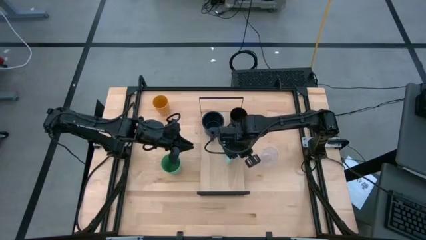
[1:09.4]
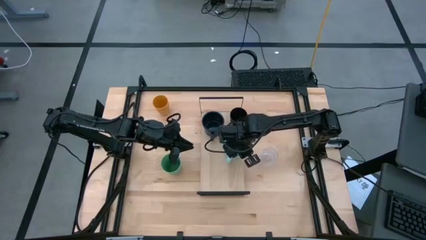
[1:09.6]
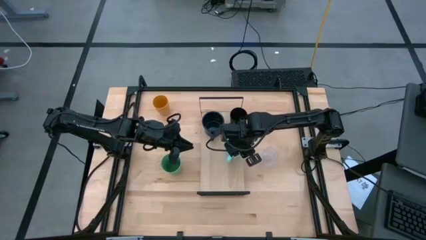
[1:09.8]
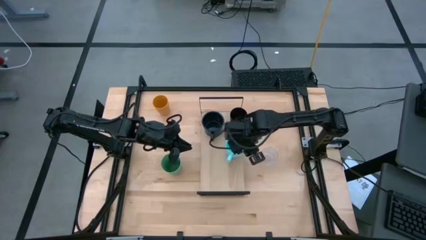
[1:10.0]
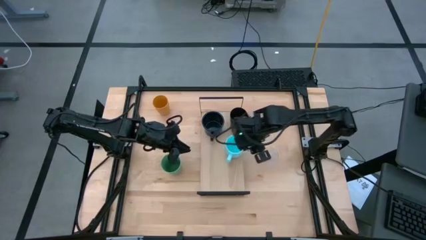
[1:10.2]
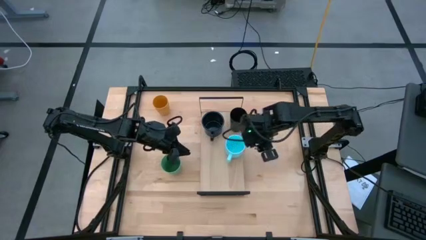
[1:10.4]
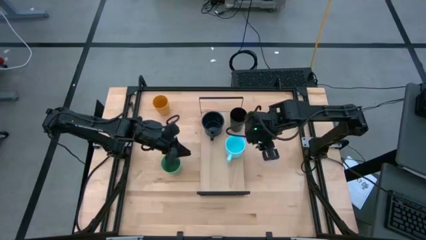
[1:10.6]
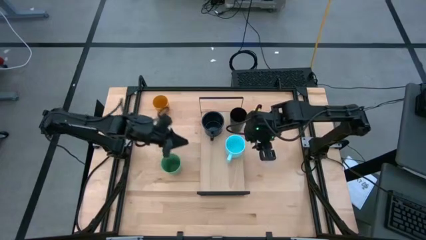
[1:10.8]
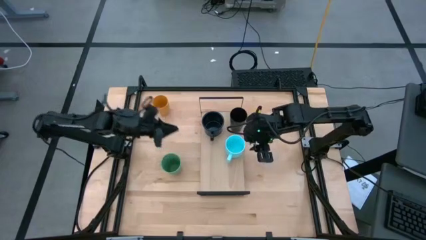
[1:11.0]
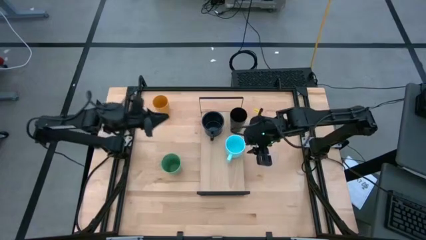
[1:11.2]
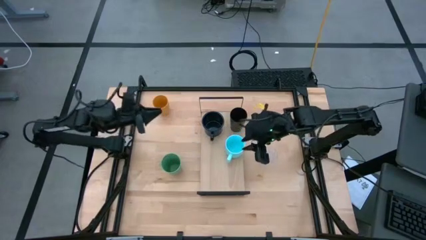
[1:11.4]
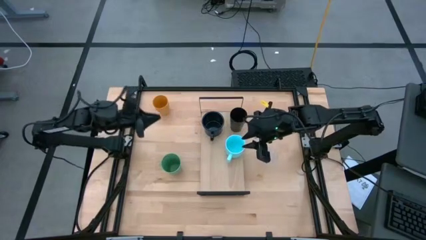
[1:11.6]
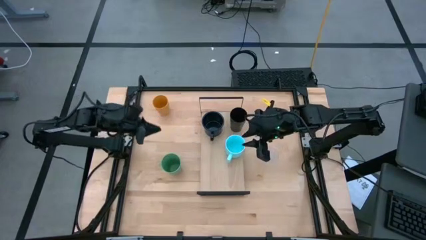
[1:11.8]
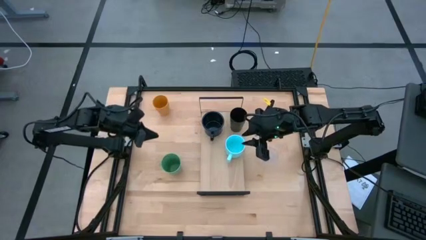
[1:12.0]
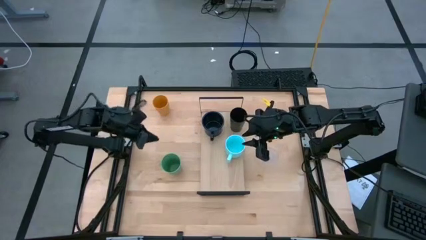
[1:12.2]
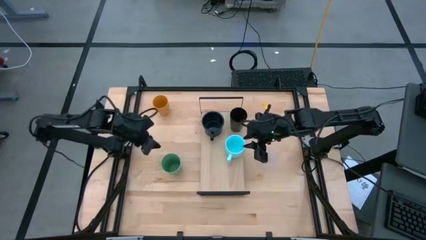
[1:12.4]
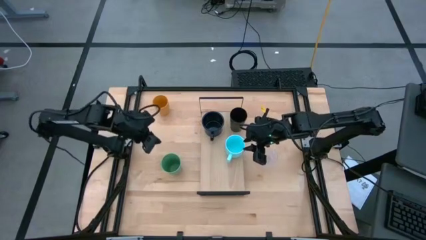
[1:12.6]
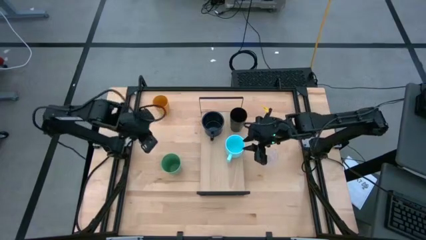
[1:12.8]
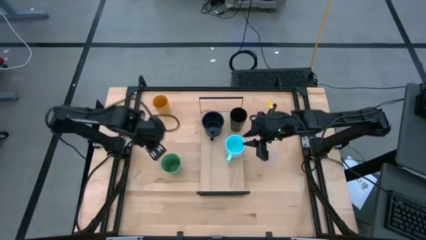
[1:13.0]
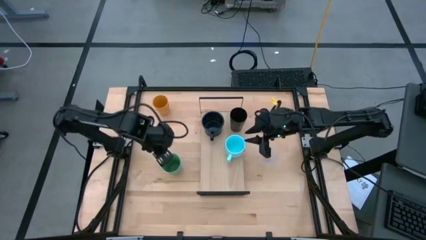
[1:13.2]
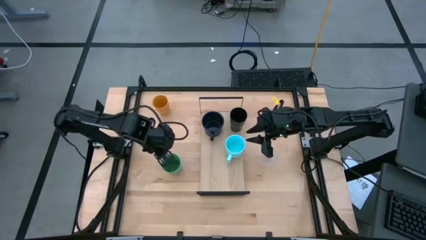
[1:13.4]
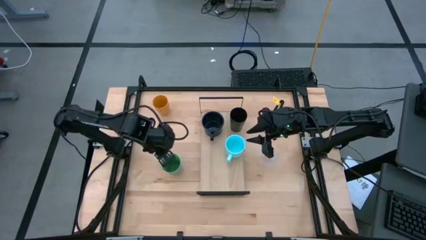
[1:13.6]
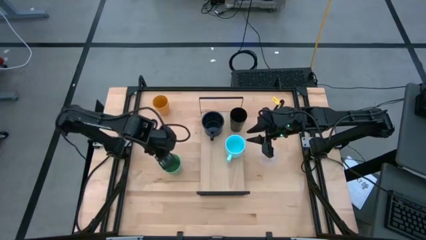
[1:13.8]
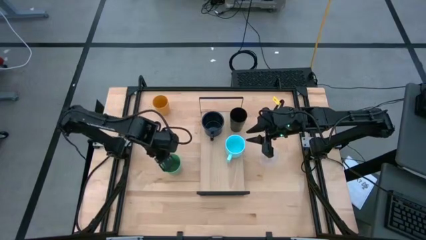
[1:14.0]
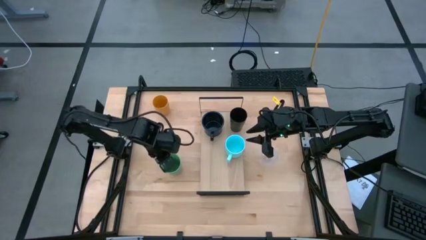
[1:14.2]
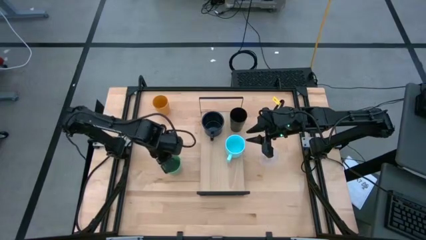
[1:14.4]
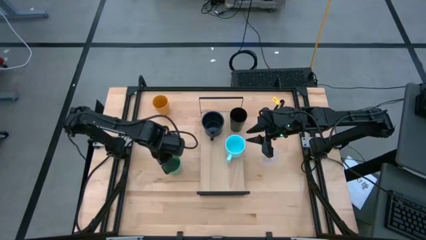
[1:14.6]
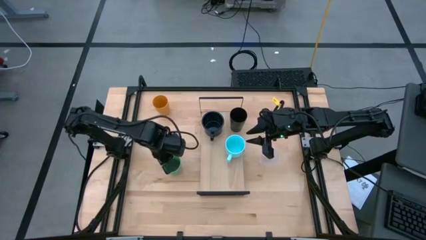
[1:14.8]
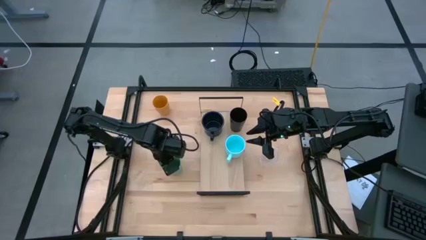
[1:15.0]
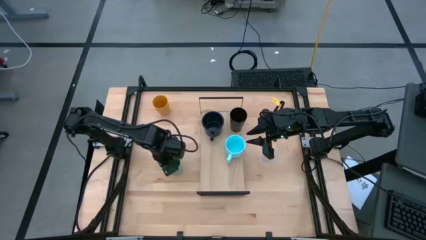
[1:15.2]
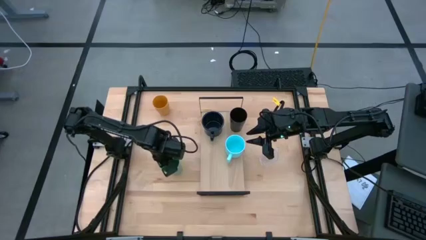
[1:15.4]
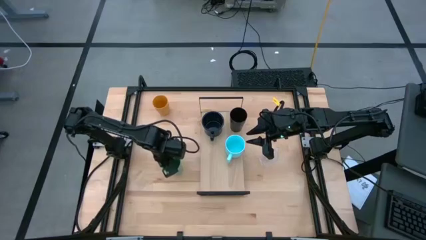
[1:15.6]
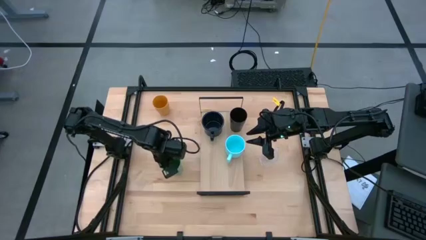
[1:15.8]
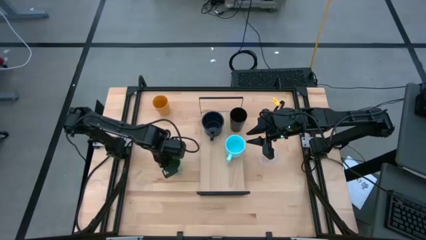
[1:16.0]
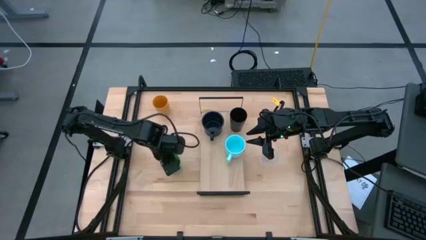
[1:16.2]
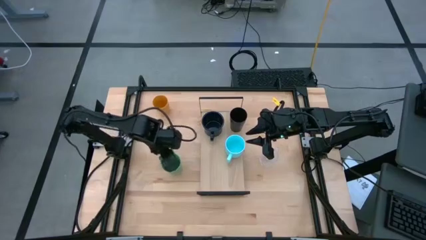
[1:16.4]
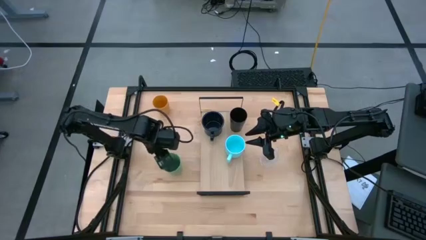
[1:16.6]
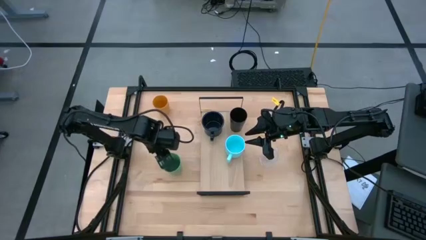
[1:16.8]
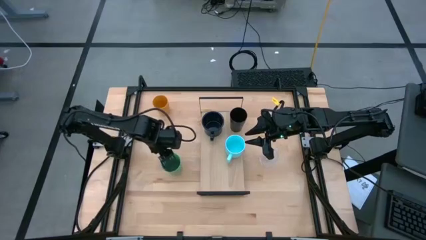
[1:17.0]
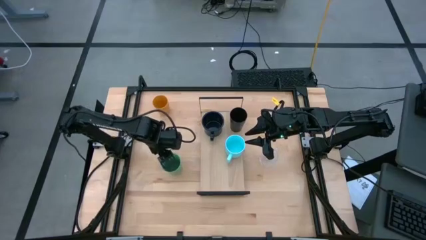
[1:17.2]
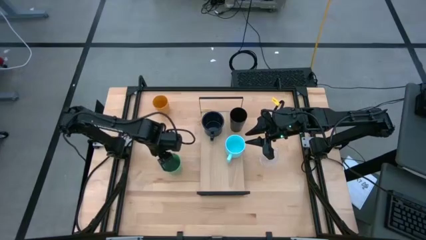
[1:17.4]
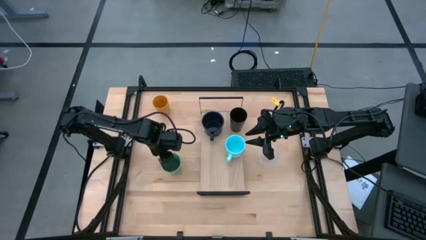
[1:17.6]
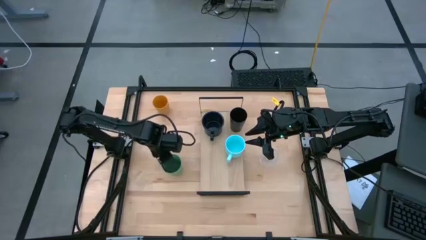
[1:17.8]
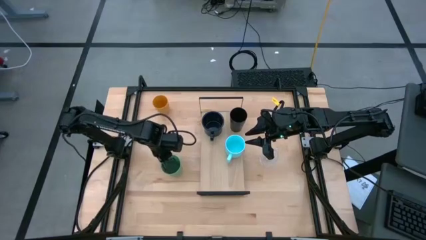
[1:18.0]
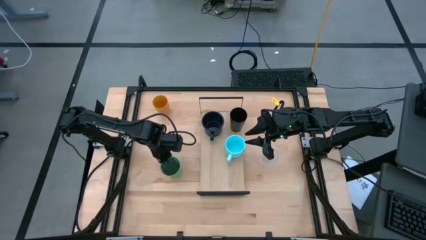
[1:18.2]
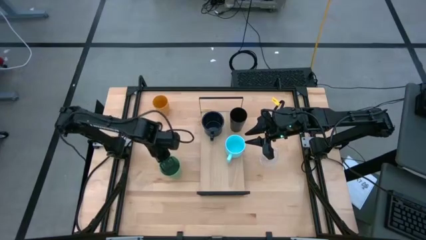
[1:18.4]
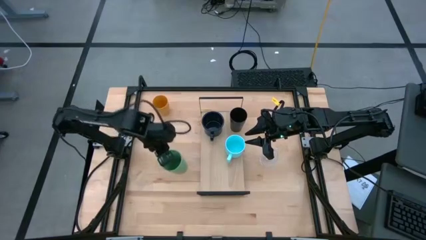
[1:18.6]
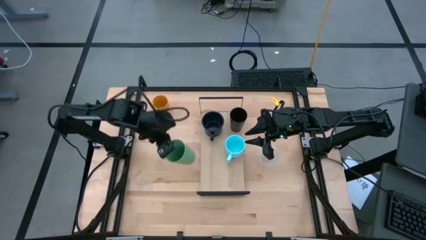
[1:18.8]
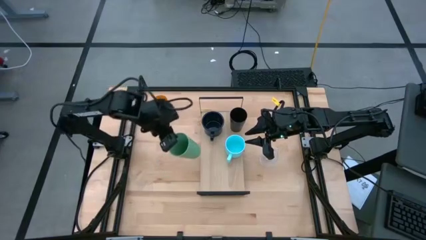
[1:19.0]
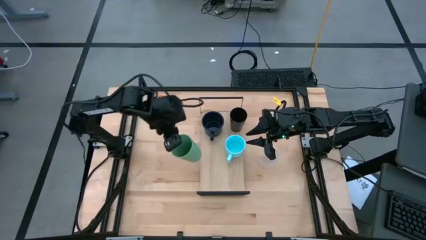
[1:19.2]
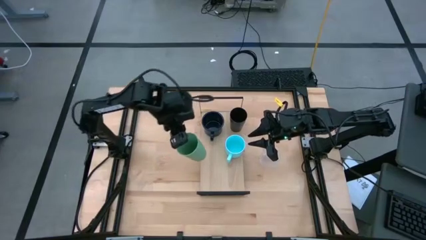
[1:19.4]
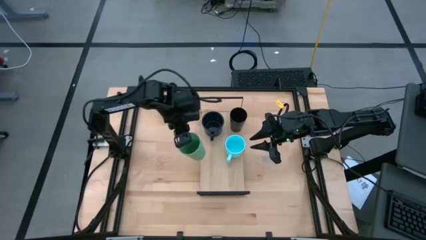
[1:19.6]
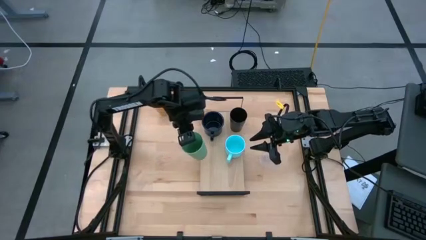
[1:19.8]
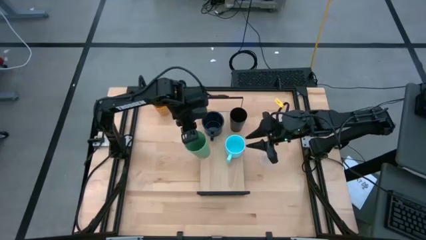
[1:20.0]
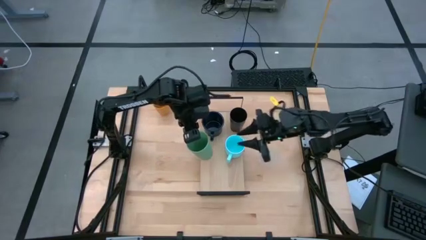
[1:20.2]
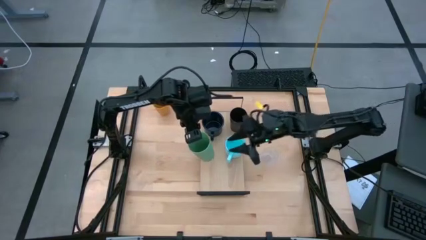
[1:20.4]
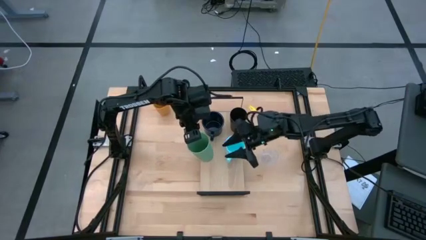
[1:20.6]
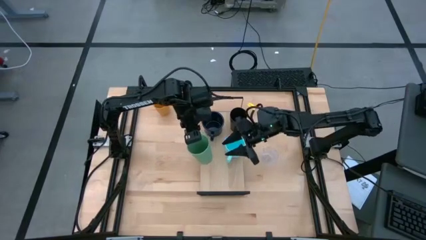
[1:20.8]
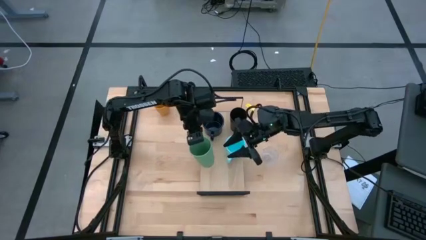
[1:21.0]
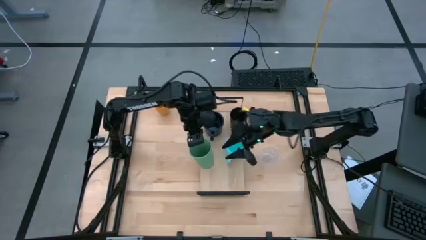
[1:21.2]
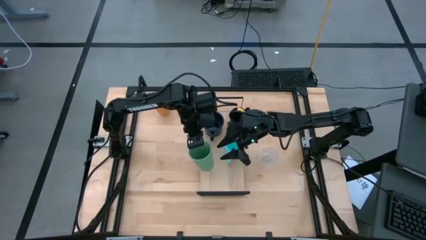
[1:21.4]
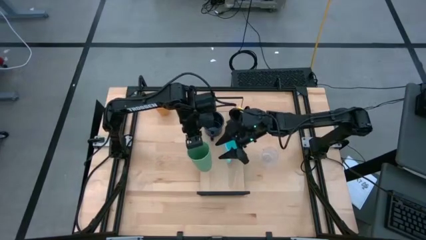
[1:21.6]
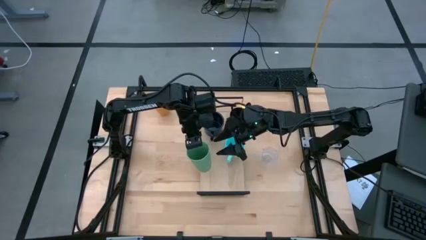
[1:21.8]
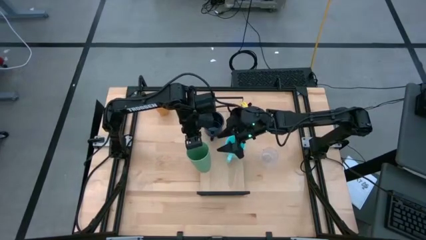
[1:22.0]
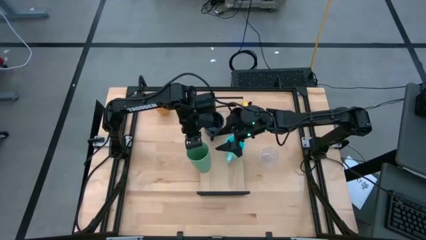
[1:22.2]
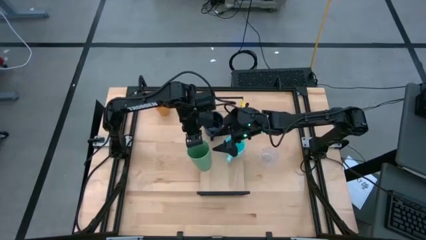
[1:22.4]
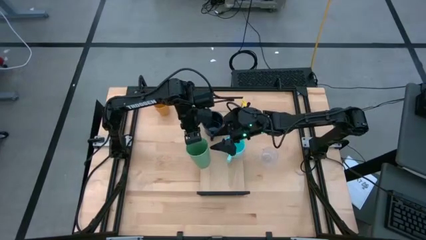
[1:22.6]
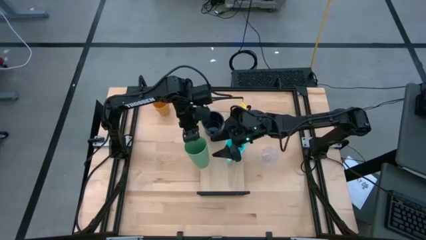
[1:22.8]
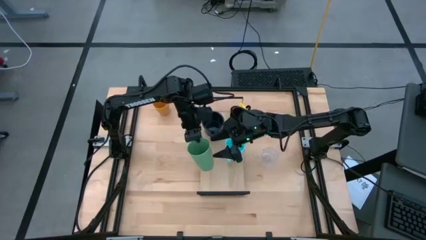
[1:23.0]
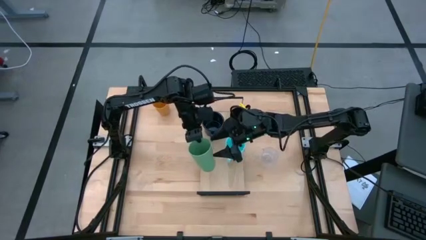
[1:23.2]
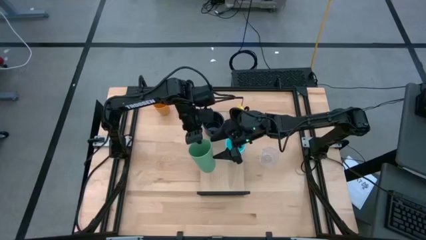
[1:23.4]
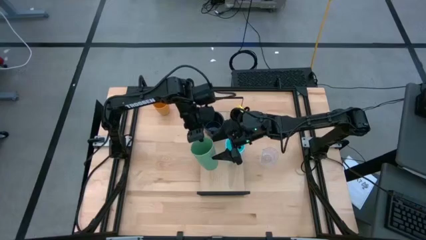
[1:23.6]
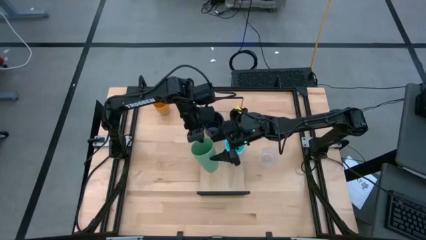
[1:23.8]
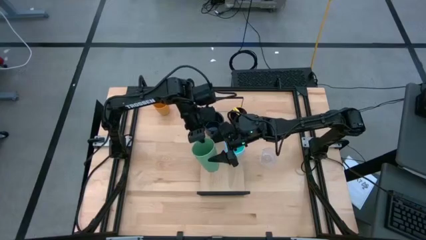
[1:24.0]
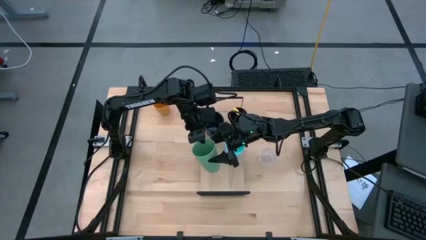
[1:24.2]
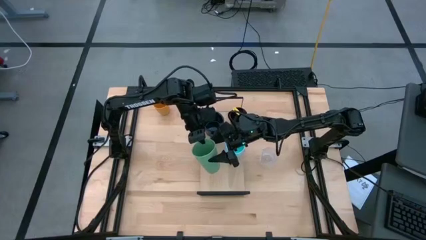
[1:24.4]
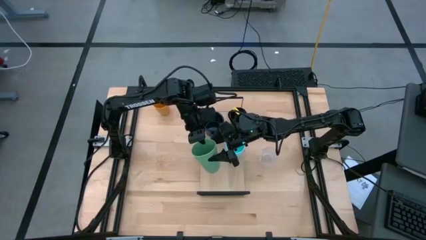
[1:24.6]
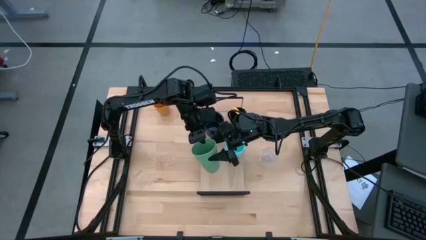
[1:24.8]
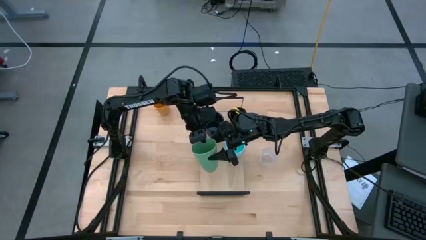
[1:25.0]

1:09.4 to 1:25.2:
Task: Stack small to large cups/mugs on shelf
Put the green cup on the shelf
